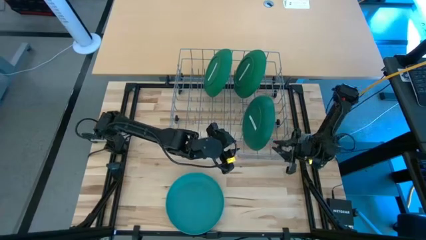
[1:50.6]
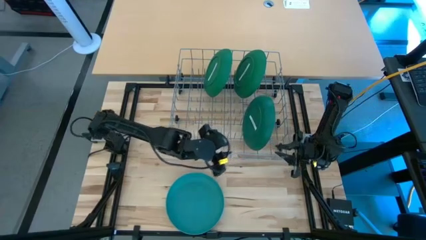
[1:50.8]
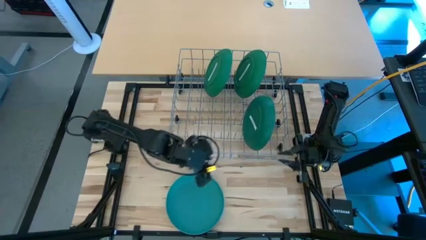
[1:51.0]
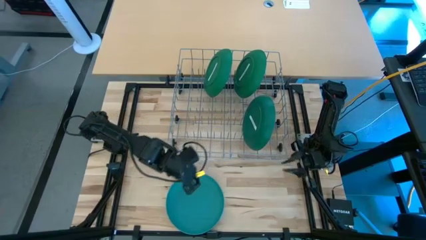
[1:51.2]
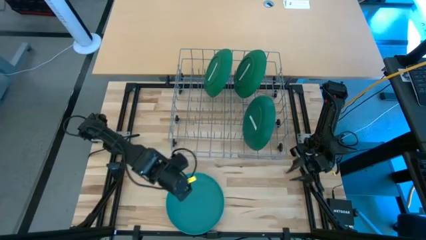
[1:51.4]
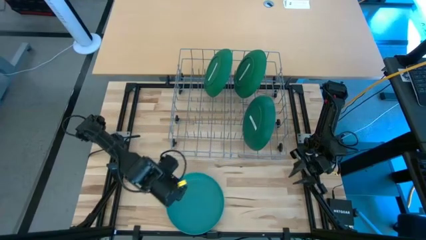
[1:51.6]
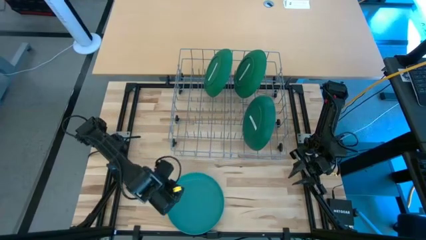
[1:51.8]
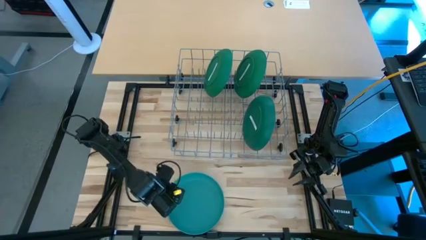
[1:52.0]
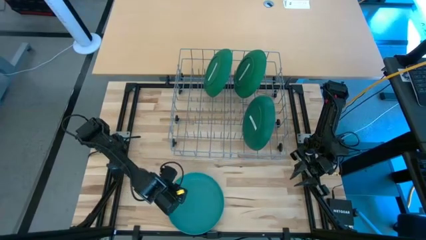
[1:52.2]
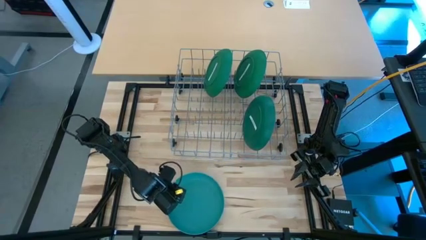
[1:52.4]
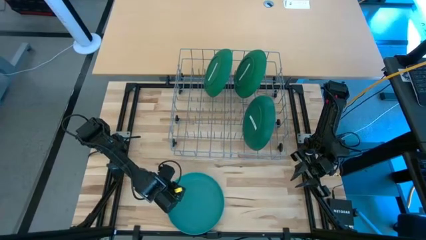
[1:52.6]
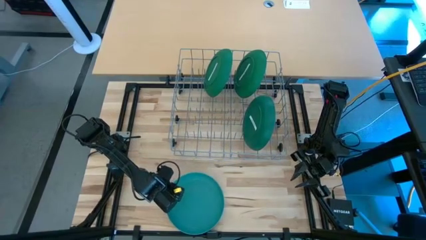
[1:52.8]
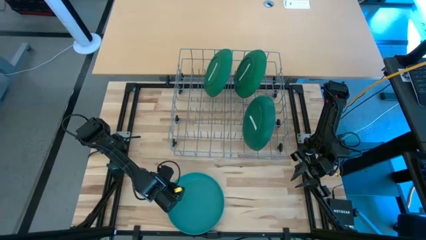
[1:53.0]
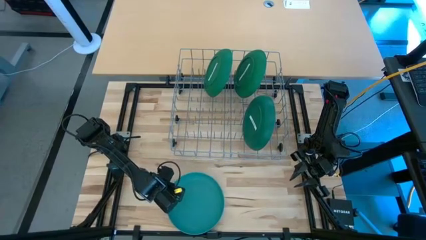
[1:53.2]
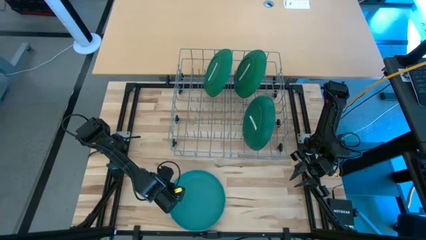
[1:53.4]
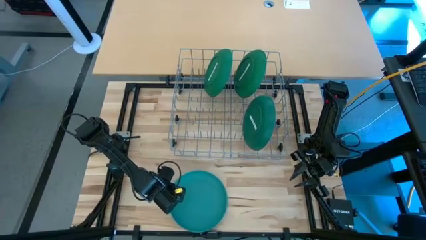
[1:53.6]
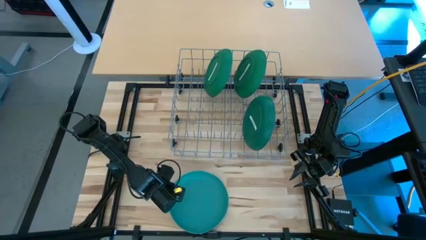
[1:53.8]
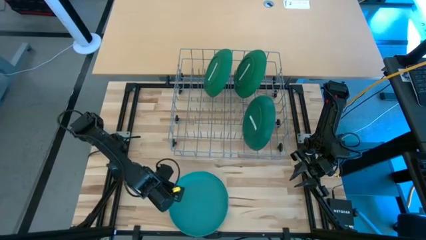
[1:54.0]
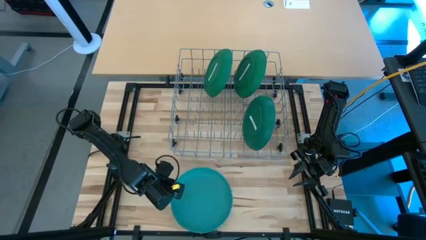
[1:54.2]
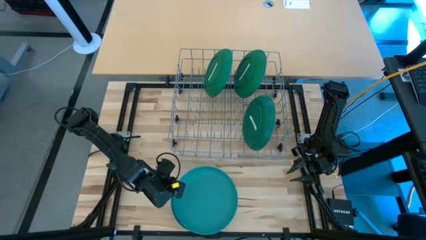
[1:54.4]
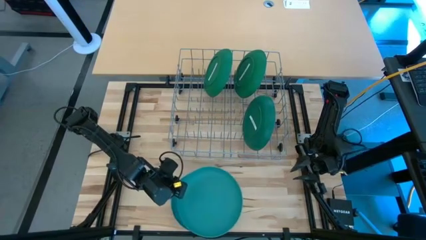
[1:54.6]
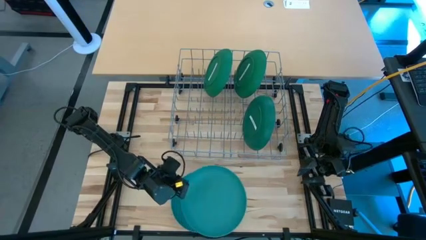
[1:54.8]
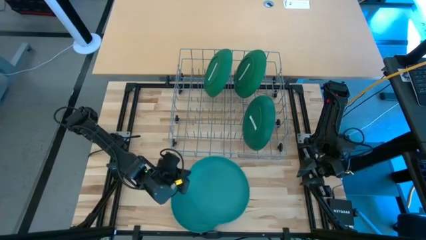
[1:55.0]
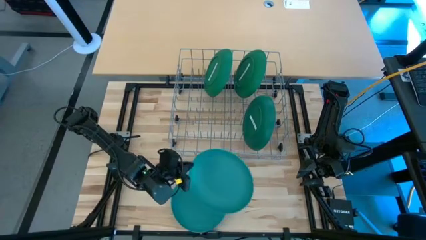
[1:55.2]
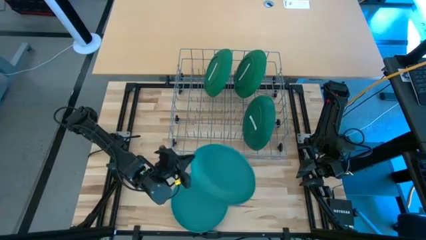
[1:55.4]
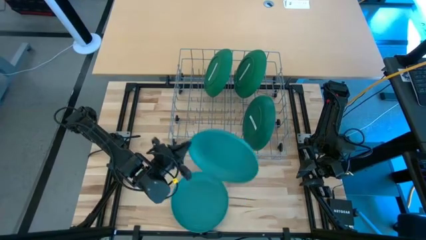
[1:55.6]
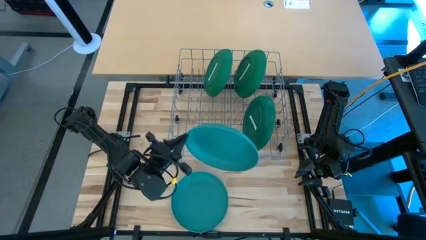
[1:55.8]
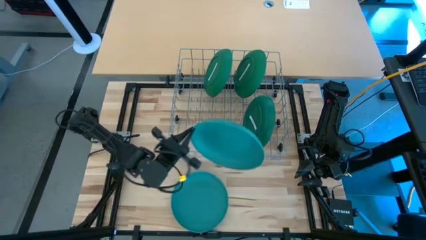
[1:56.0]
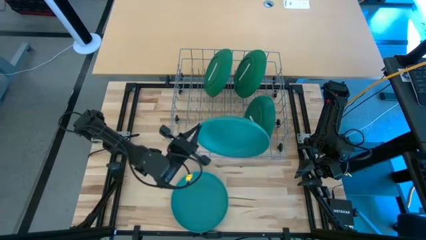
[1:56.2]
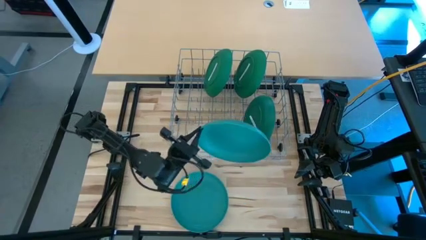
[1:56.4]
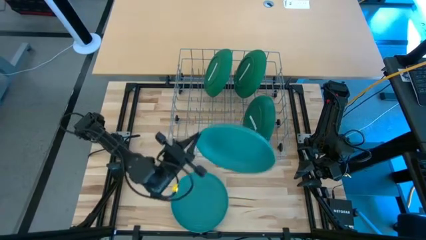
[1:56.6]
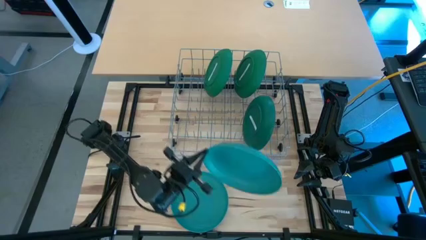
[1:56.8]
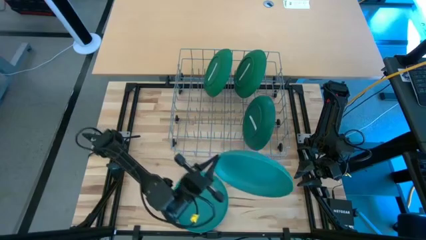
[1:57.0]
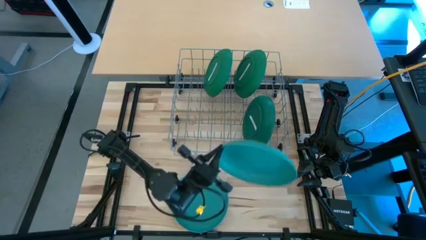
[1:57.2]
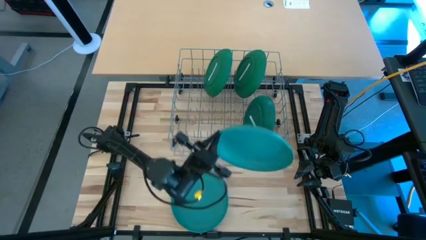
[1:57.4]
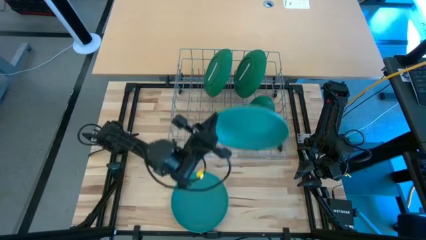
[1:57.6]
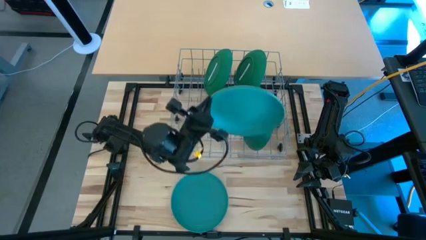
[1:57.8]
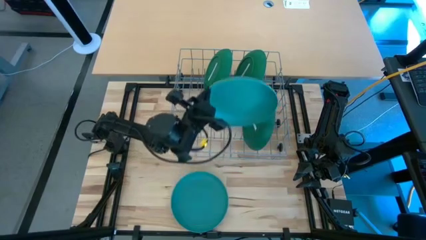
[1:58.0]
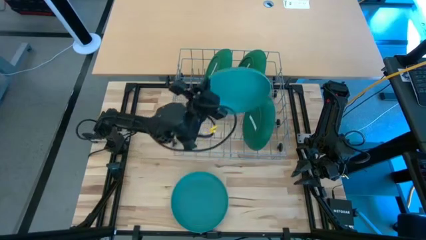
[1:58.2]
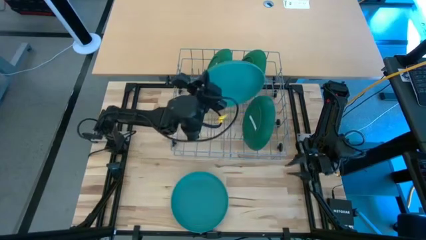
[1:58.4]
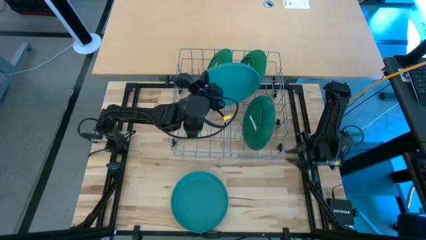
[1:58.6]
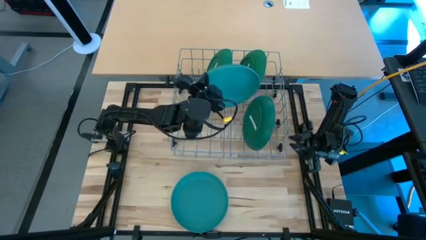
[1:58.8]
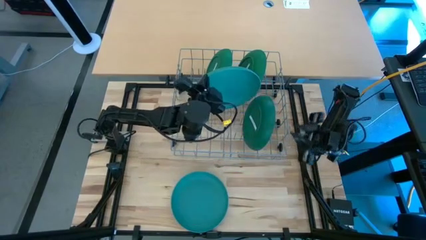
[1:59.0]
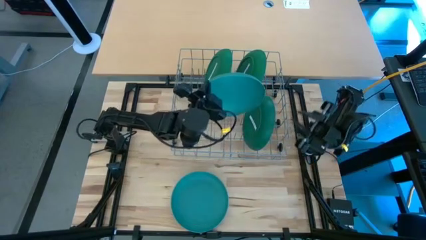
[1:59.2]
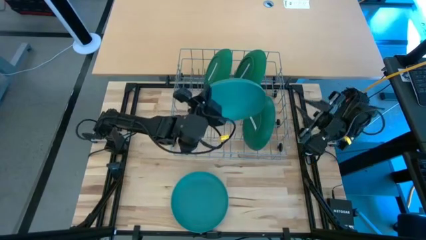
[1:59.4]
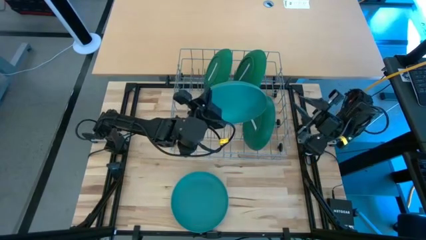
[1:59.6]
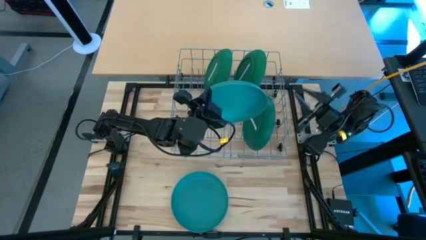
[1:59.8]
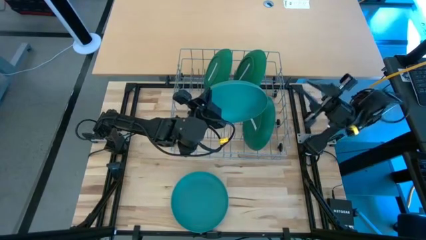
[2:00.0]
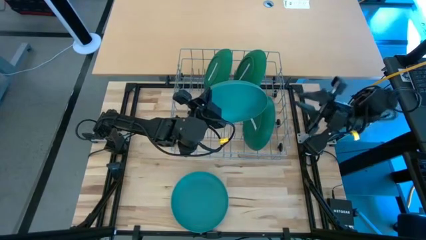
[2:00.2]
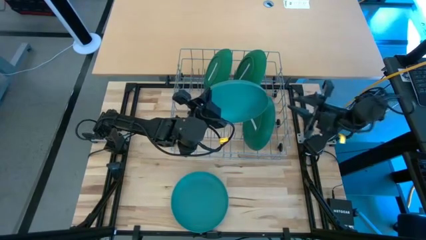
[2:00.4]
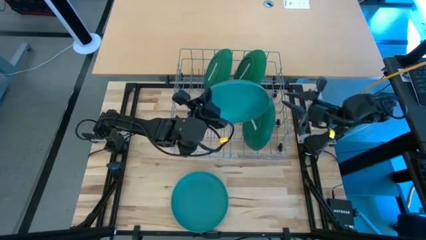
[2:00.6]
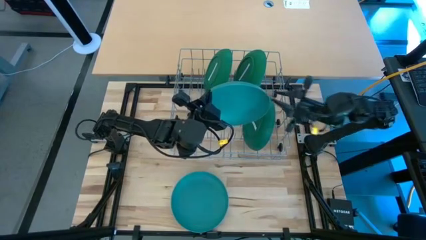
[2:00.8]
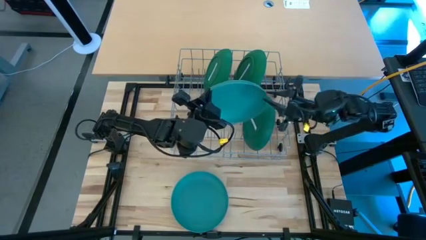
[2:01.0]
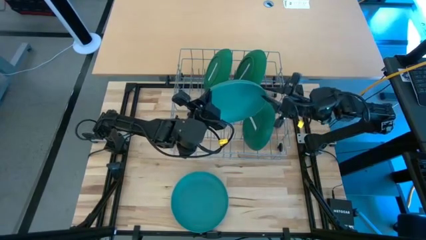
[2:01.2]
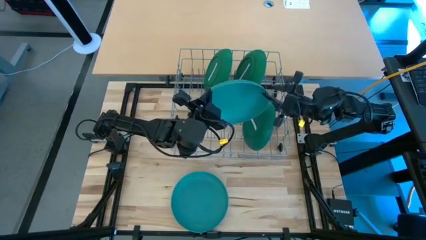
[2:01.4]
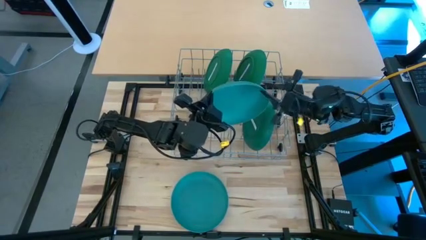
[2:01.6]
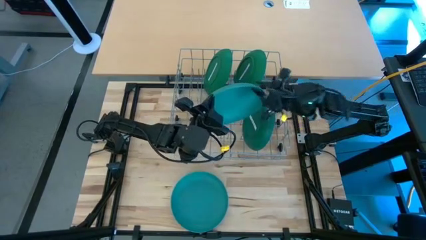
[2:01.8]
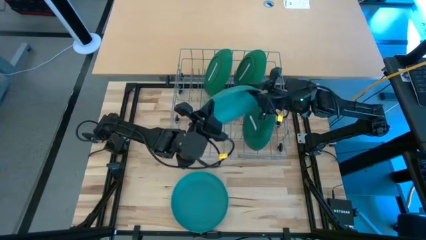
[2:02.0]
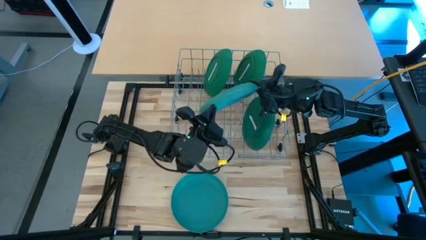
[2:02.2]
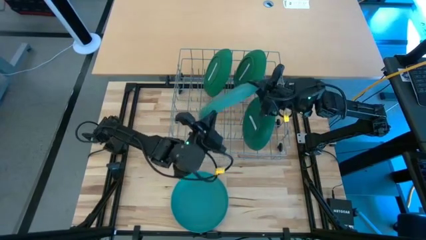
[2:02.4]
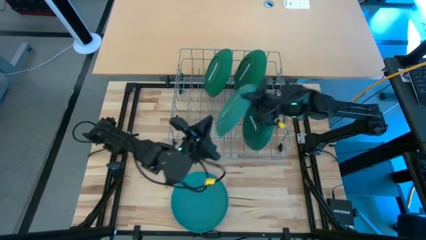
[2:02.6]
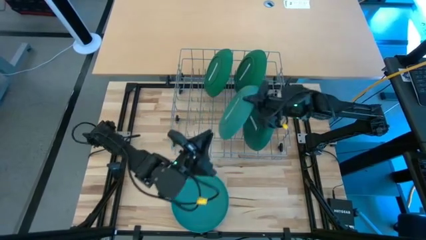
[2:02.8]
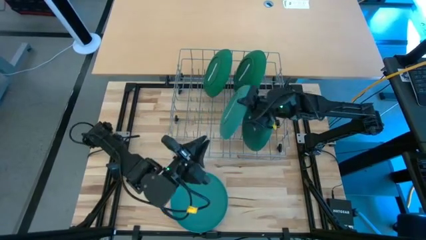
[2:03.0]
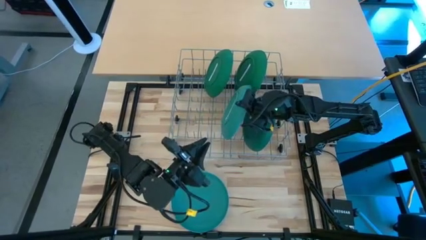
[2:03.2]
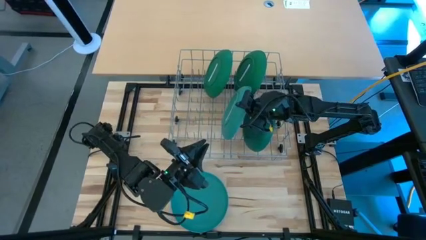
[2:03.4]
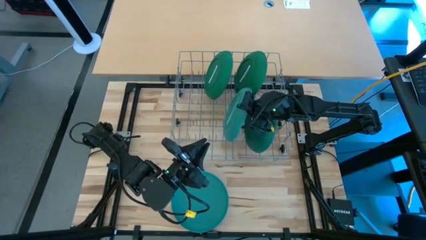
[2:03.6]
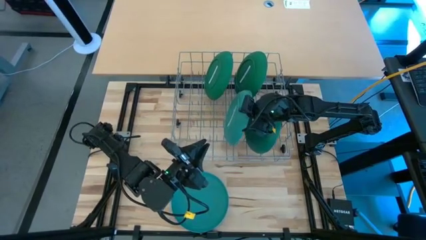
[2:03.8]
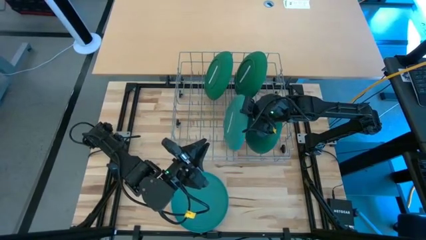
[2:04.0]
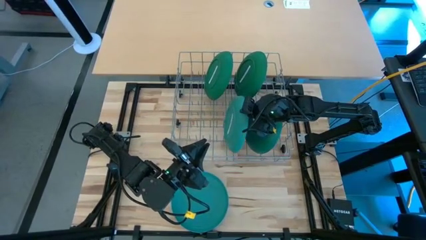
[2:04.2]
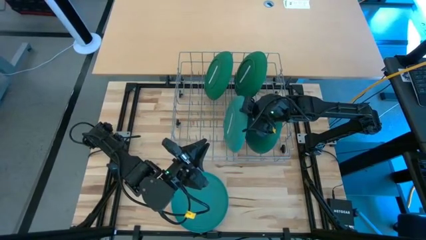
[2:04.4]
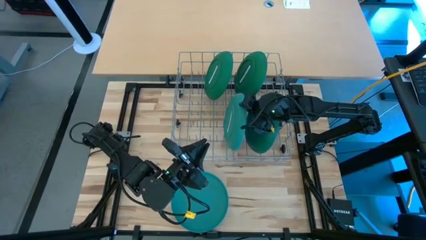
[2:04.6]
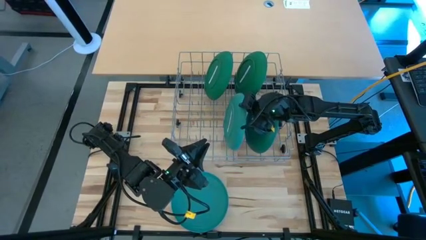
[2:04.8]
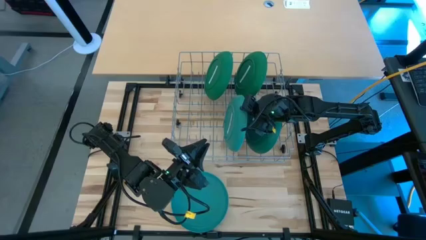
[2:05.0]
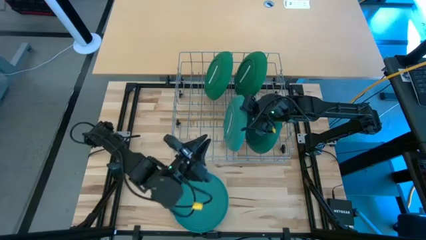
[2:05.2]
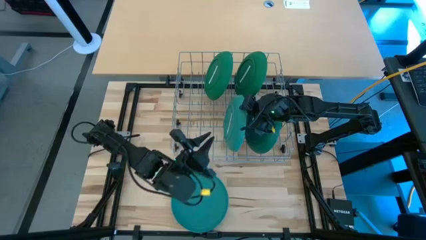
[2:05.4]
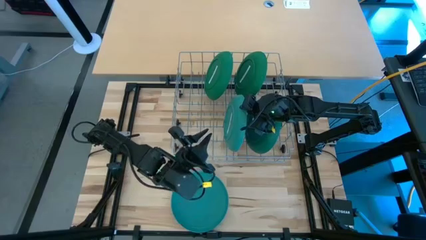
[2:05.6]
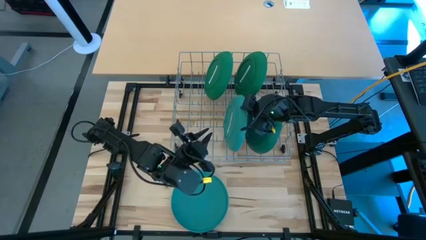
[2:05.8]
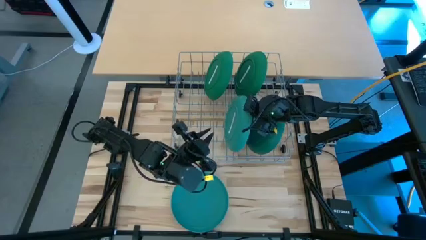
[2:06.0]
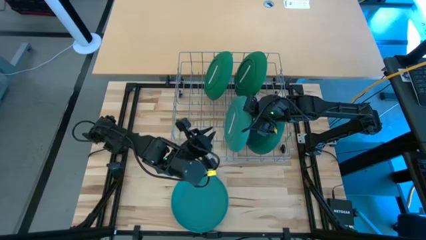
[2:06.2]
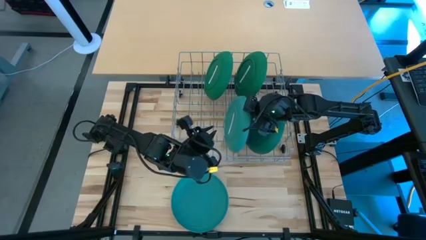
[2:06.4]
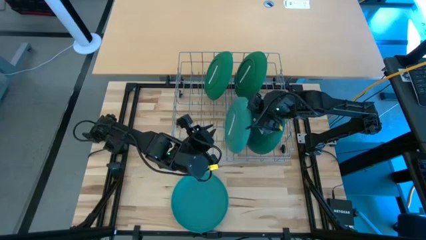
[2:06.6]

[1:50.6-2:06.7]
Task: Sort dishes
Put the top blue plate into the dish rack
